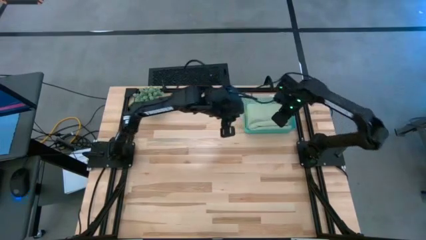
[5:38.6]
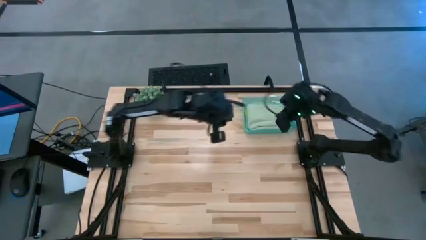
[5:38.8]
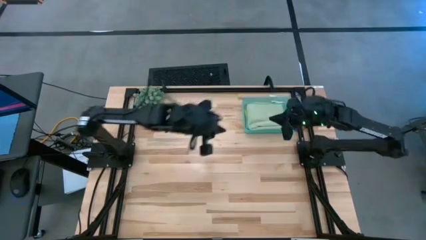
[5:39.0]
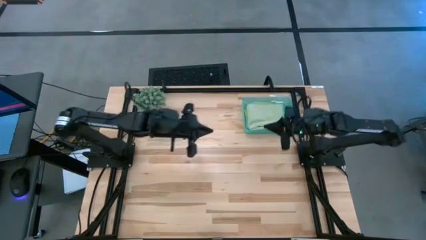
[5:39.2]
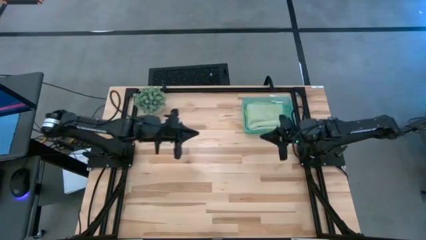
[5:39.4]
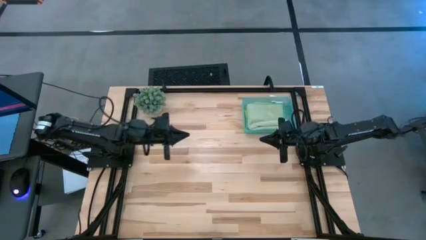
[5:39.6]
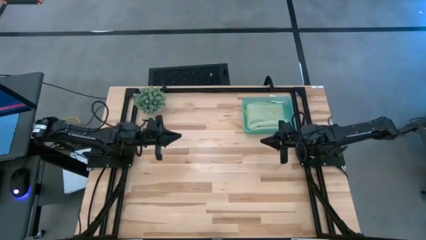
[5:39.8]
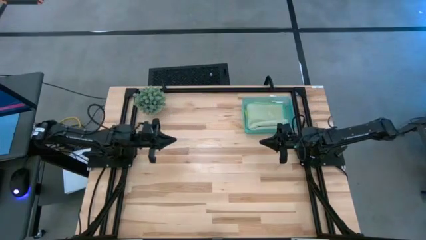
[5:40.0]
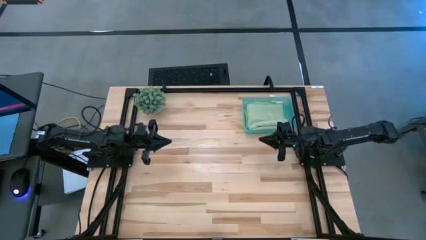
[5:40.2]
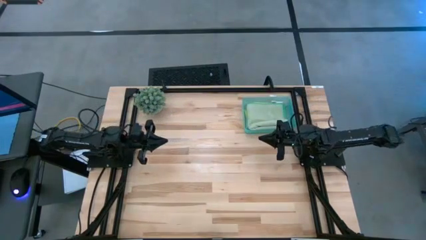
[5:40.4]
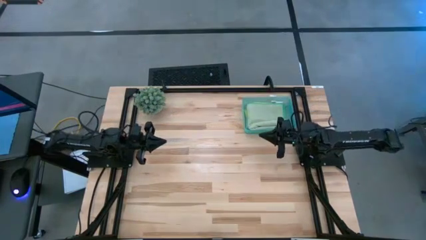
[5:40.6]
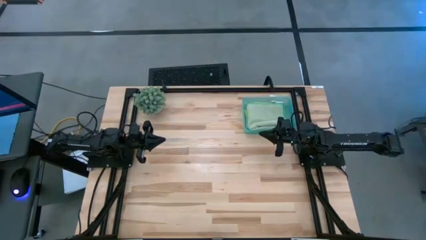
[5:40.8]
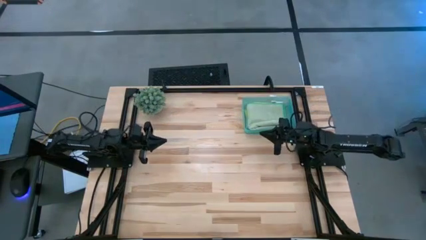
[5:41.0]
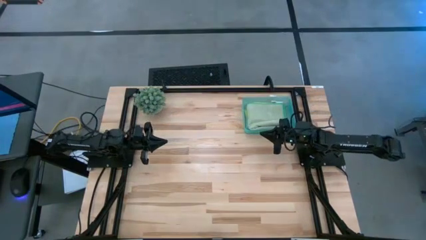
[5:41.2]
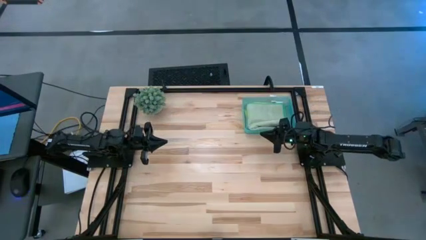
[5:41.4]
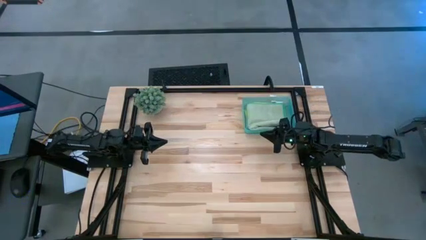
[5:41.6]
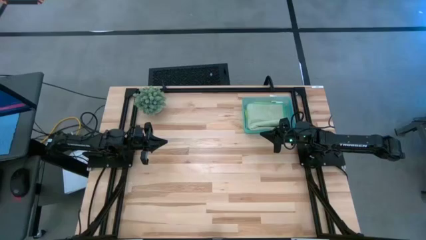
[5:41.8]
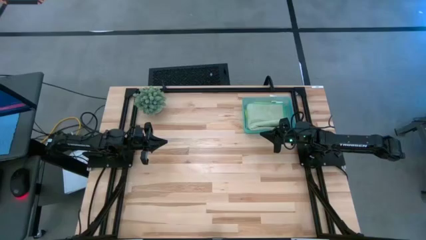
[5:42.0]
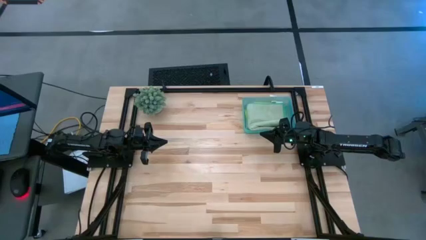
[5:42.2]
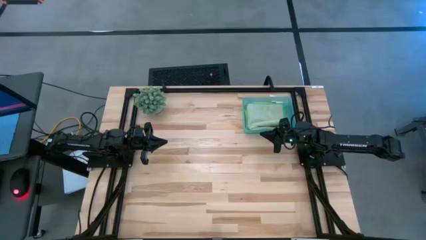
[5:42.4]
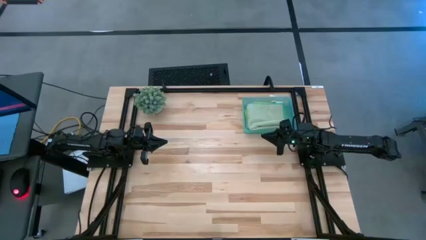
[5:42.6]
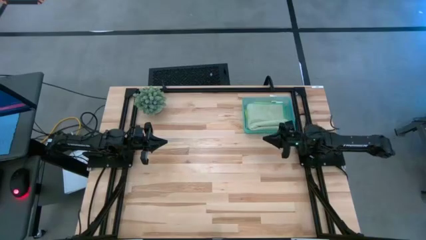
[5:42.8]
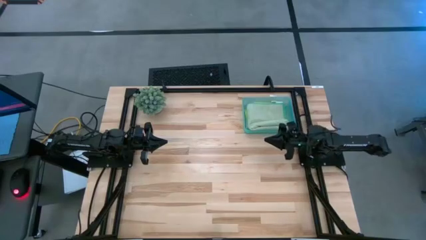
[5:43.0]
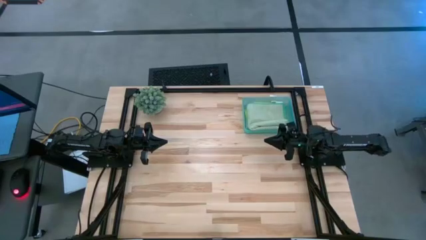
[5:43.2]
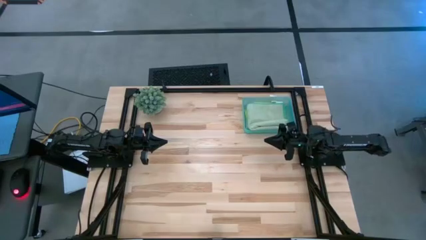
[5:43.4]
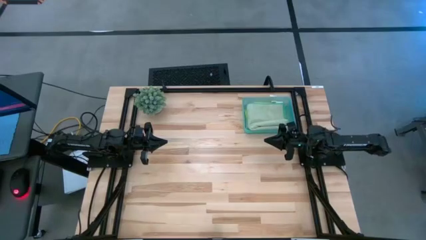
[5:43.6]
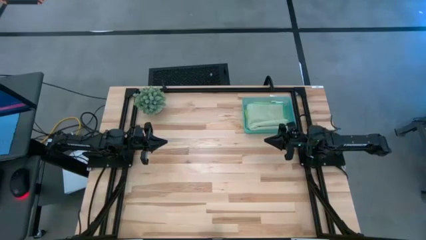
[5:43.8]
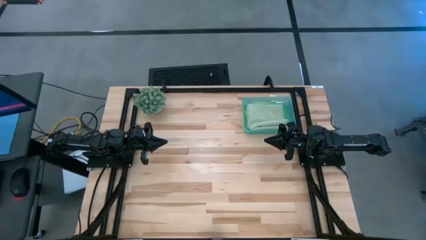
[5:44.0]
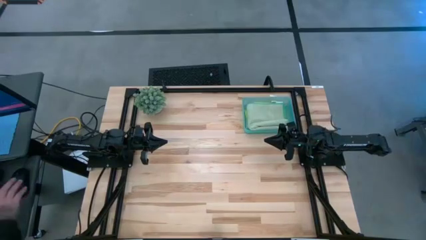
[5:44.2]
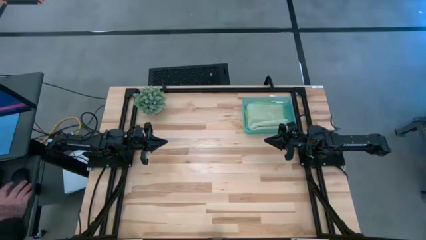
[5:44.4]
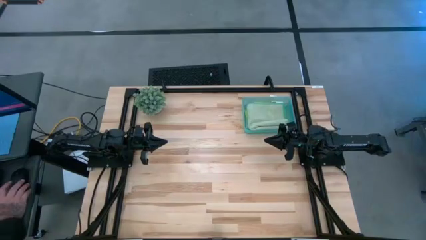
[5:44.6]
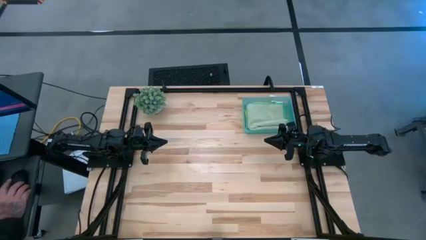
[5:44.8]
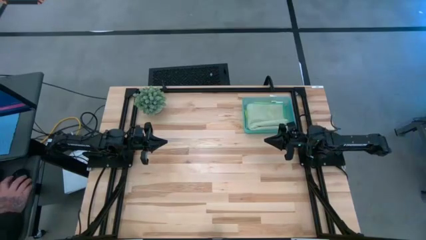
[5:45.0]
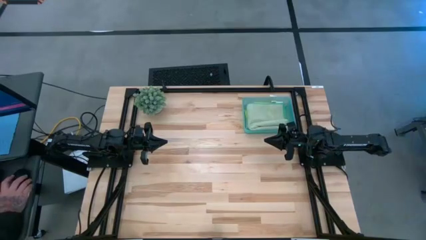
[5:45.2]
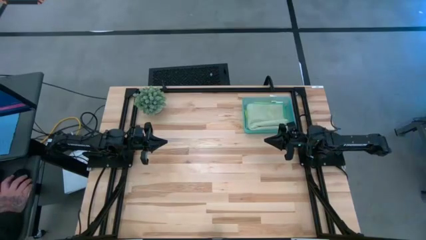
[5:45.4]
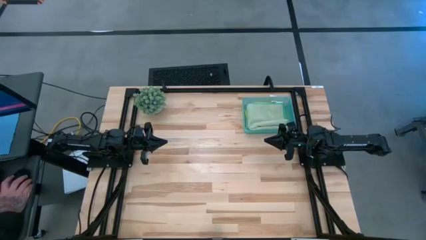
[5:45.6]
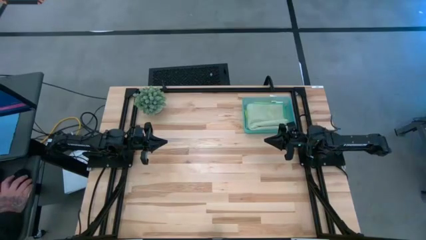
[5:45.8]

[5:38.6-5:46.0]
Task: Fold microfiber towels
Return to Home Position

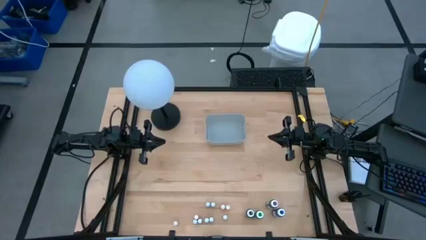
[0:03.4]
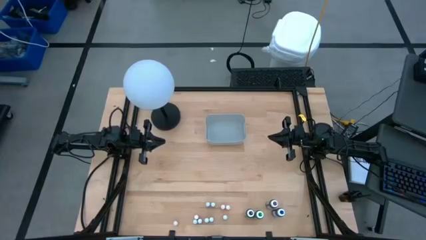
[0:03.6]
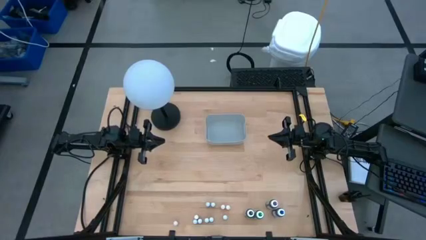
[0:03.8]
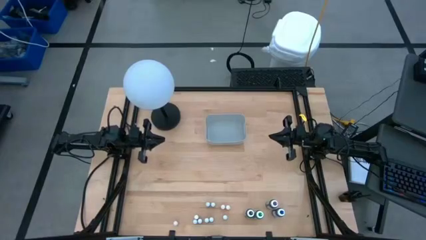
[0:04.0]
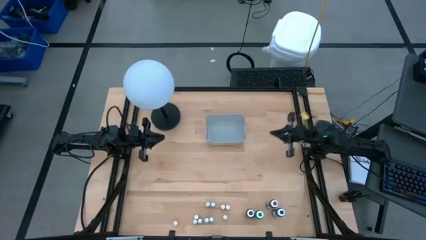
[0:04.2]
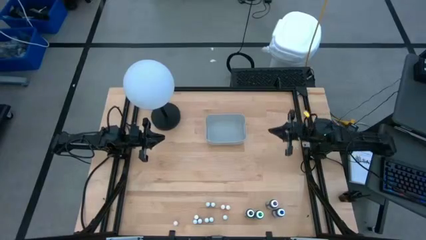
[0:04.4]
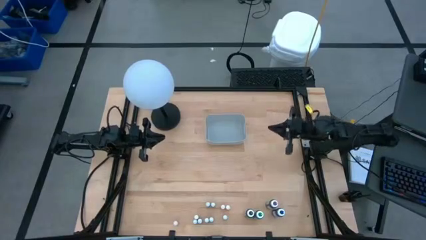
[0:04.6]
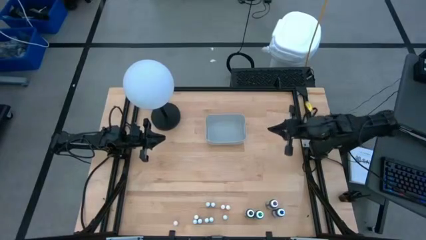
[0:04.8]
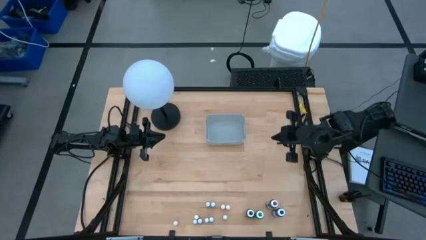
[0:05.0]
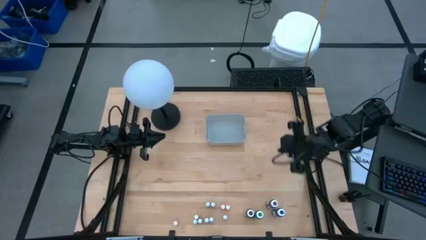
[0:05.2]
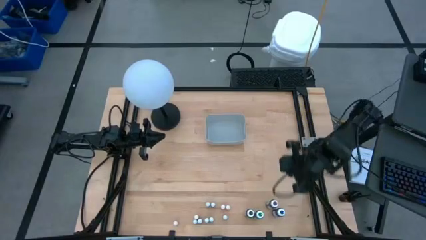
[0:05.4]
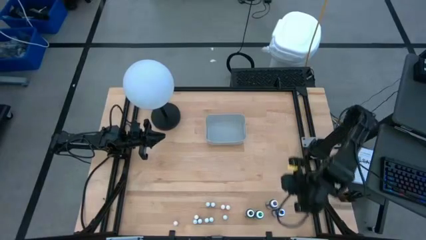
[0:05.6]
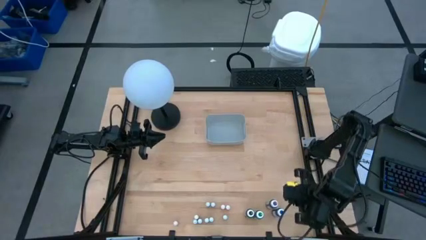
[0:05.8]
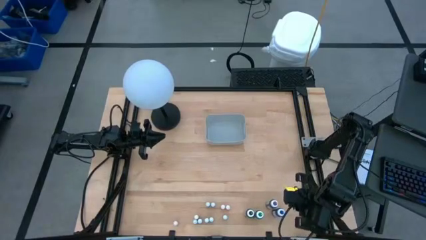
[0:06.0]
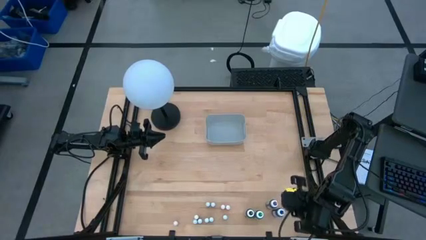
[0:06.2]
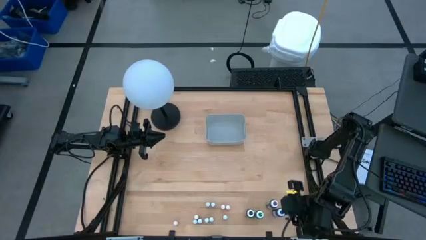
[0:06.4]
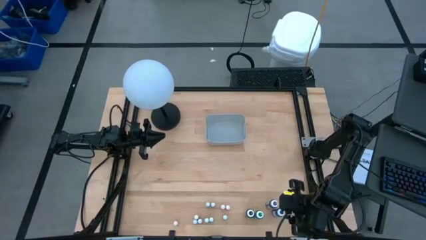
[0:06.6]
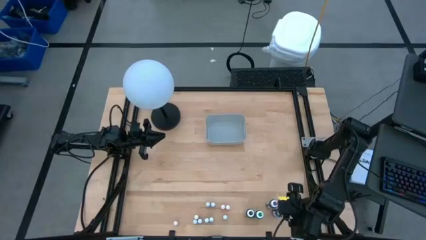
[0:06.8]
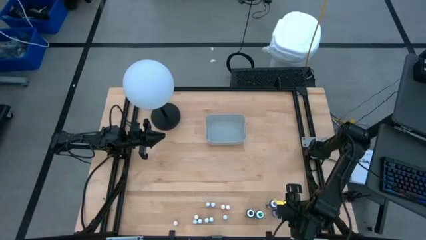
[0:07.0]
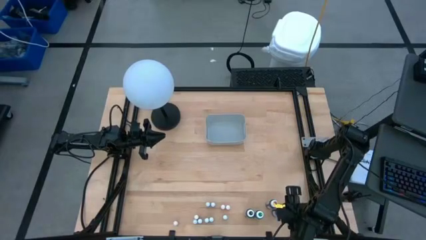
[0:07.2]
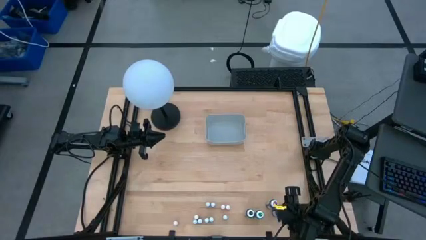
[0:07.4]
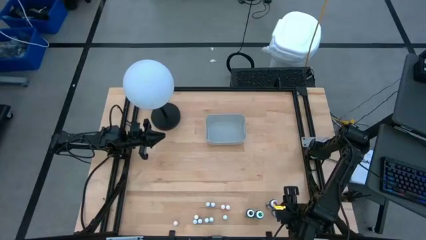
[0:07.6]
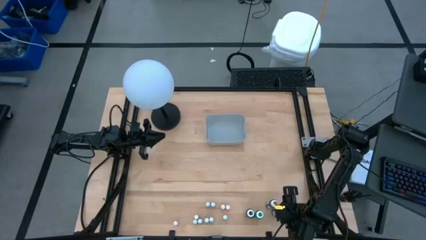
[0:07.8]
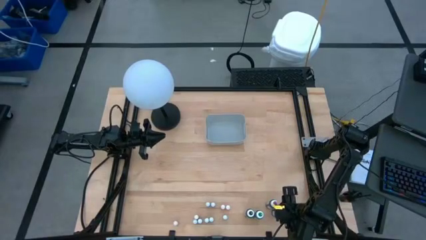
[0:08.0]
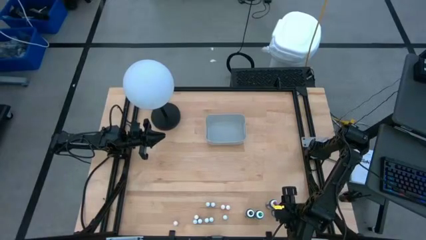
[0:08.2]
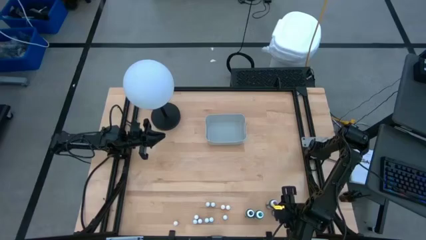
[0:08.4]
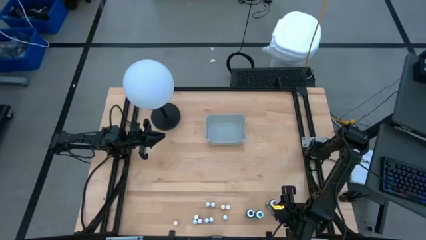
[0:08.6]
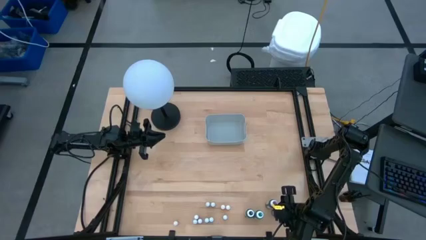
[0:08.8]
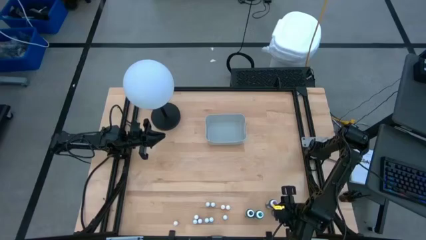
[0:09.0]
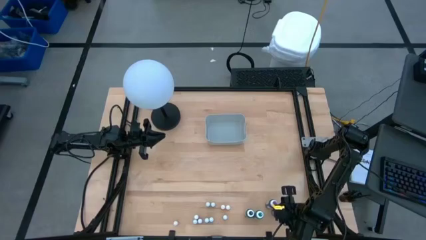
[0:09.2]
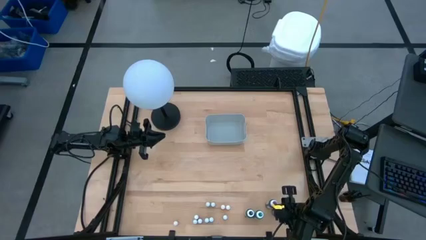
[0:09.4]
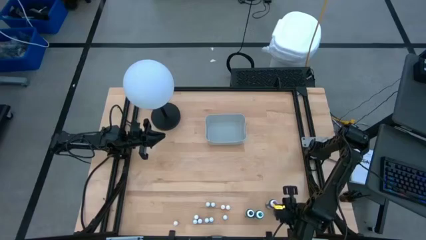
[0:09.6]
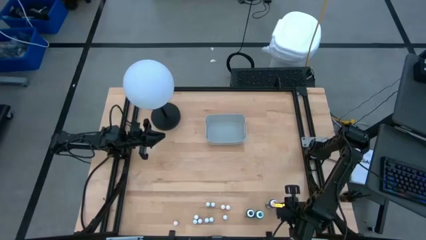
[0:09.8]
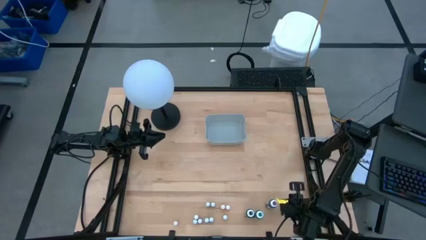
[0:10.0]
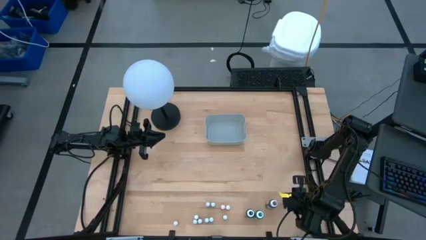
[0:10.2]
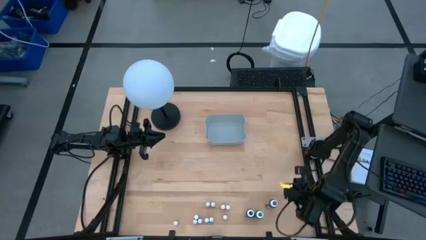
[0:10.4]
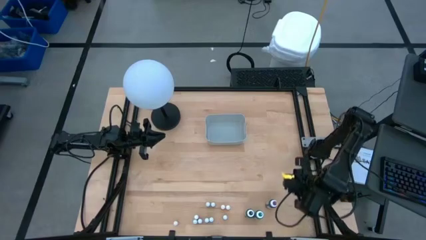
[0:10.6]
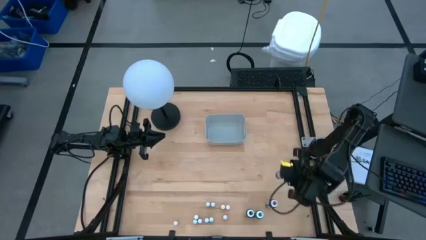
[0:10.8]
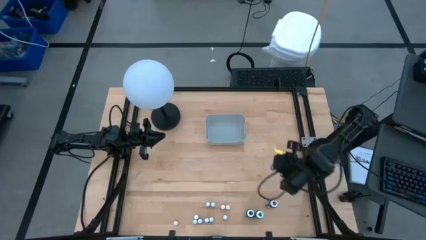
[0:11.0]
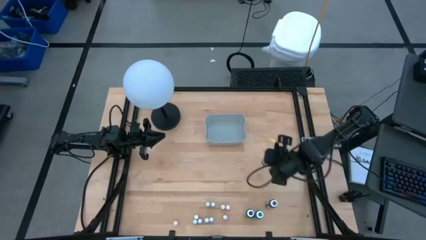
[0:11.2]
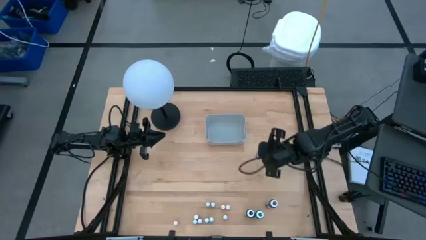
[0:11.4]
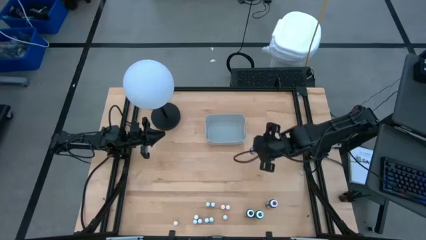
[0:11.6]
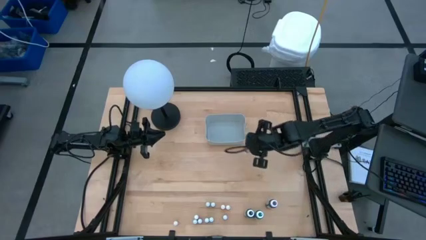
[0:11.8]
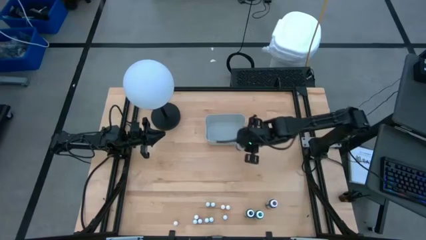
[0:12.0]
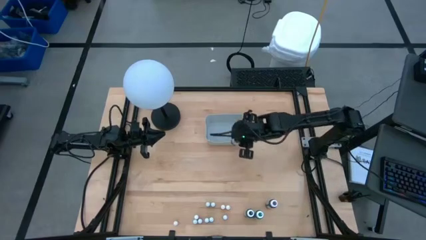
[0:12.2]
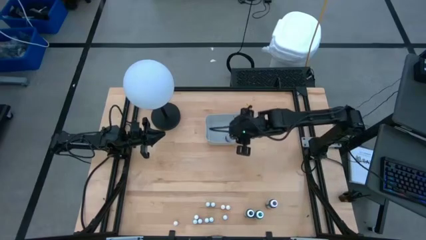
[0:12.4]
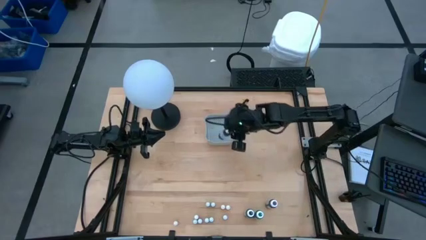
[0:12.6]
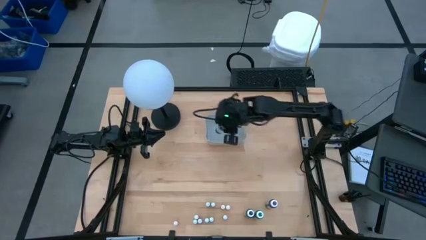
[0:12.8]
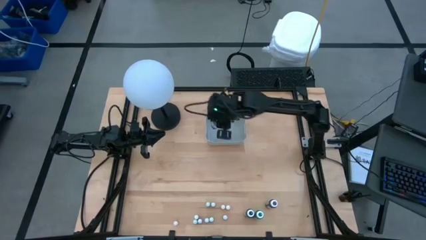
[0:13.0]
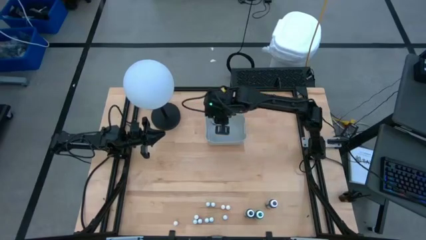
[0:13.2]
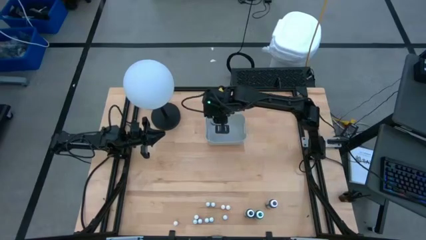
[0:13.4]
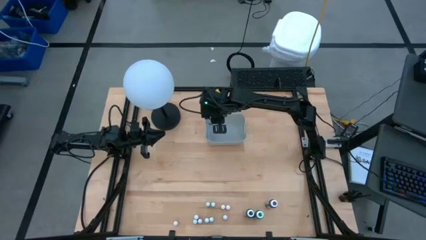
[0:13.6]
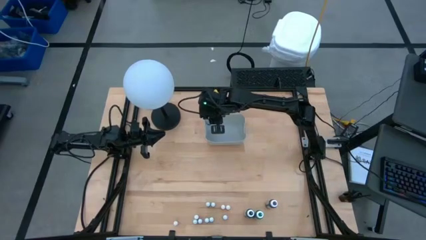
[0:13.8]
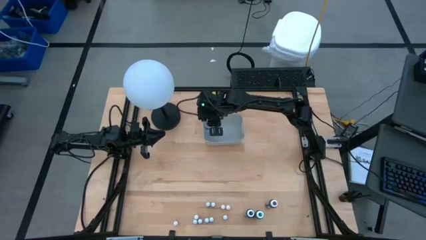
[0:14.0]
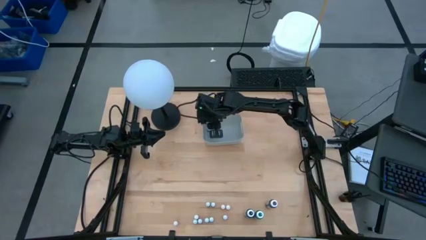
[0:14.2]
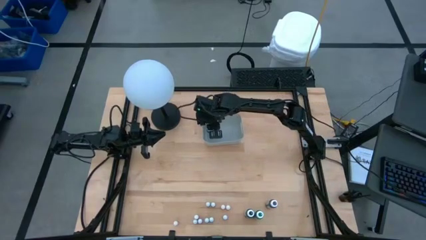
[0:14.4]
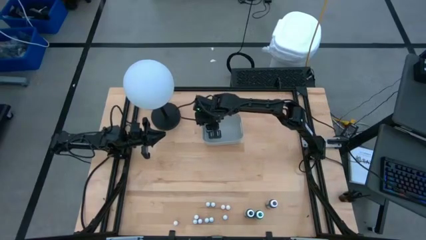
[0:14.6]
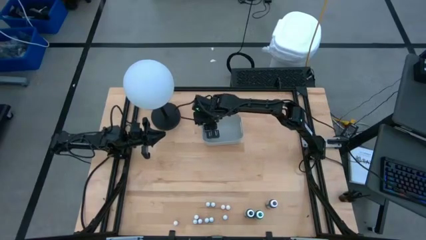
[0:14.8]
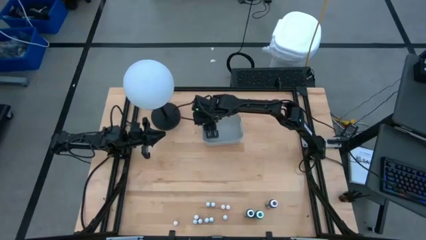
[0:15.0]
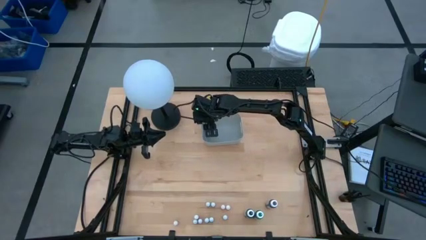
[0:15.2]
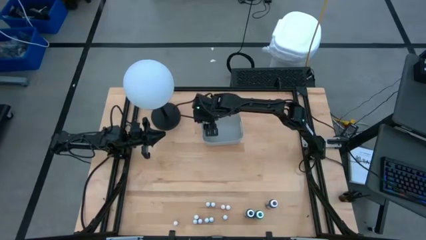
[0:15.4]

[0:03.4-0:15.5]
Task: Pick & Place food coloring
Put the large blue food coloring bottle into the gray bin
